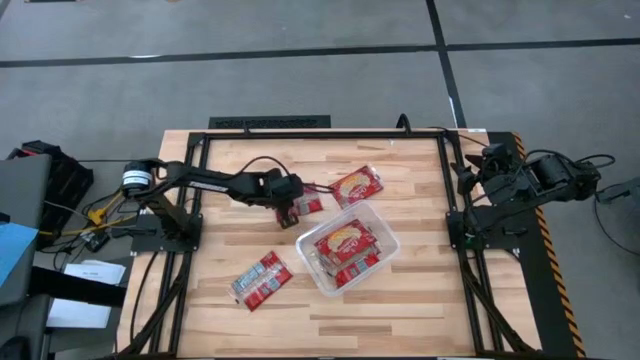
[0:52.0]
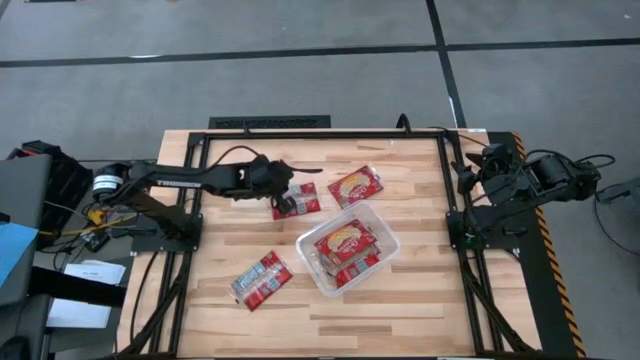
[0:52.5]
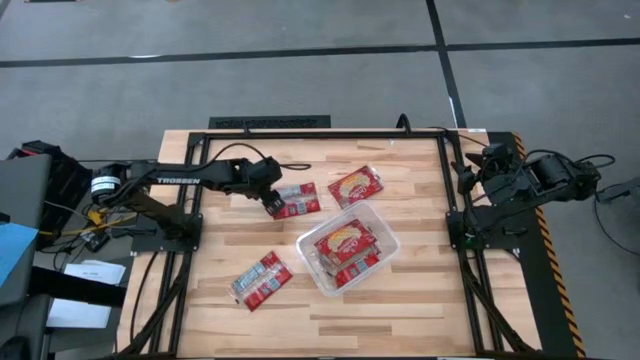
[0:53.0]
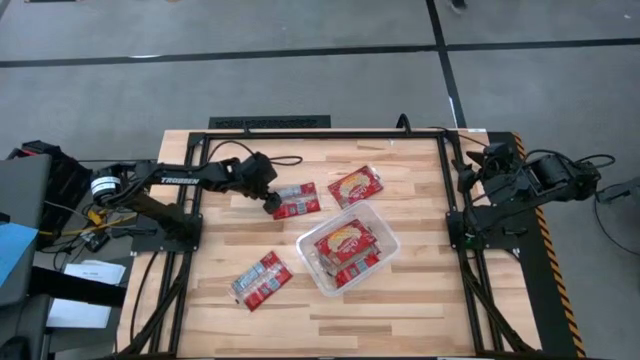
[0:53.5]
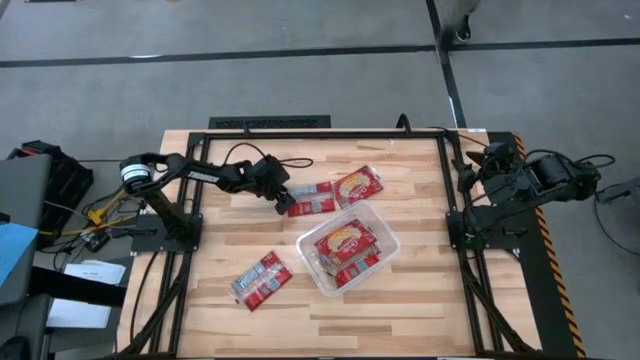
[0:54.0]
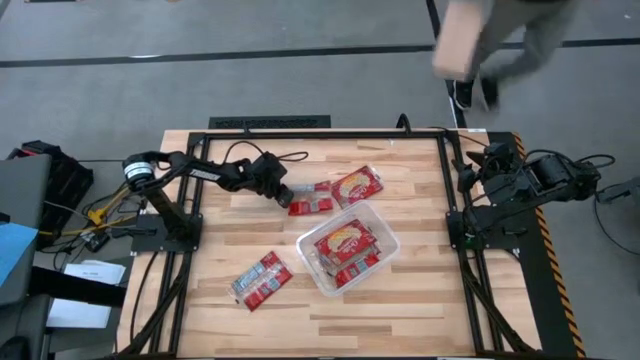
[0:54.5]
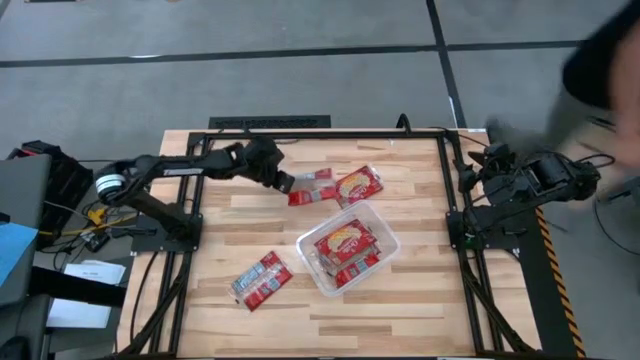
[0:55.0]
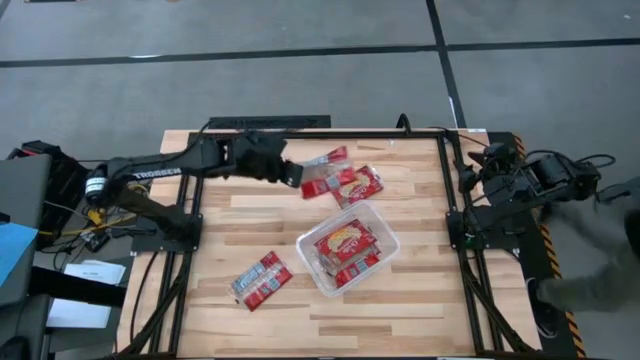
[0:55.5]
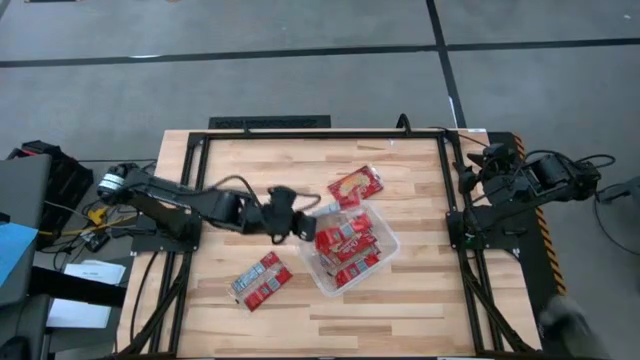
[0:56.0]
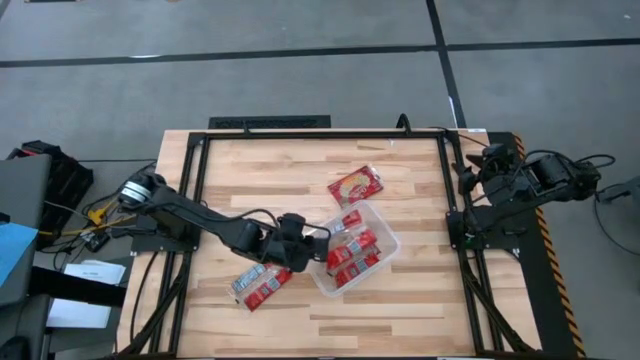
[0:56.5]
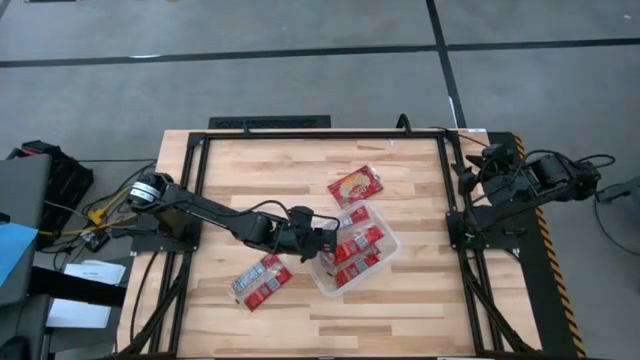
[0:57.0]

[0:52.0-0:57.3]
Task: Sort popcorn bags into baskets
Put the red popcorn pack into the transparent container

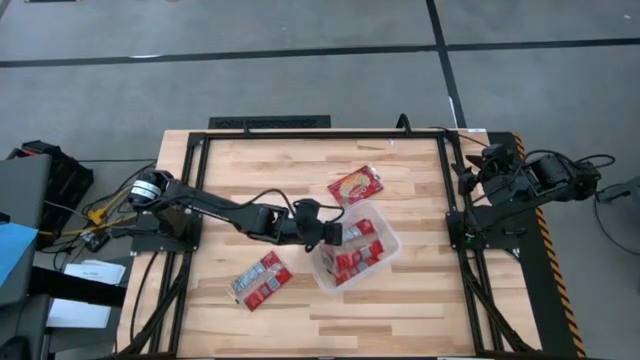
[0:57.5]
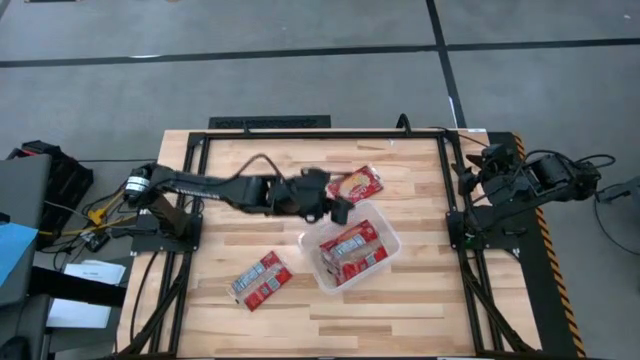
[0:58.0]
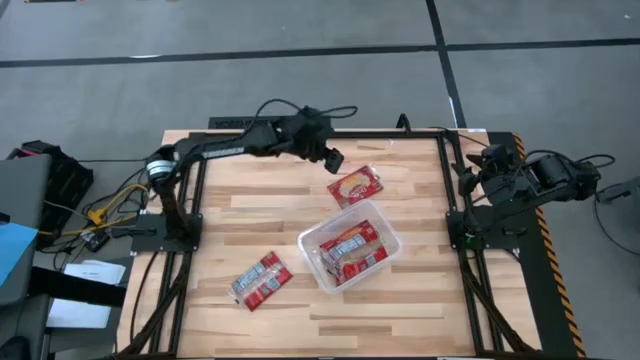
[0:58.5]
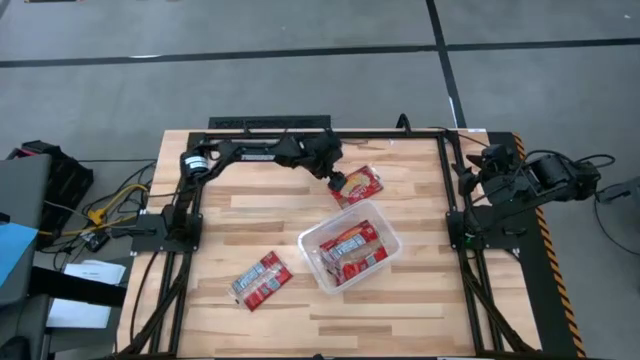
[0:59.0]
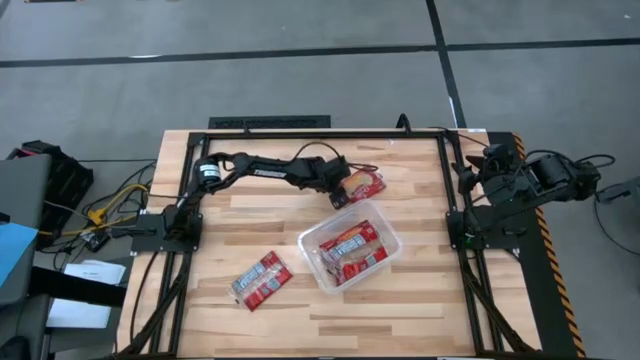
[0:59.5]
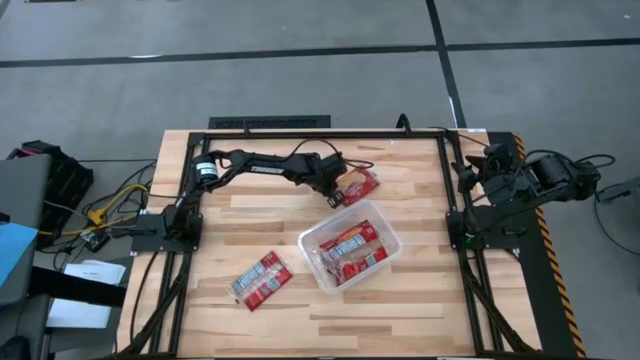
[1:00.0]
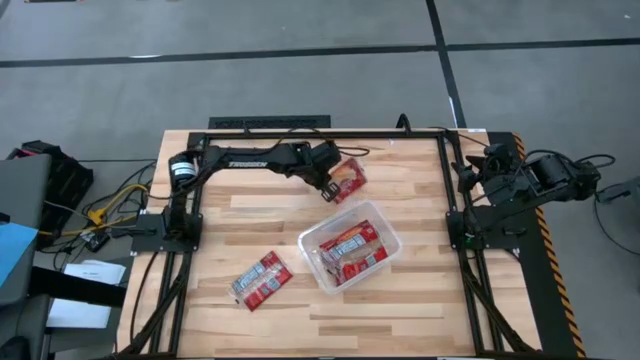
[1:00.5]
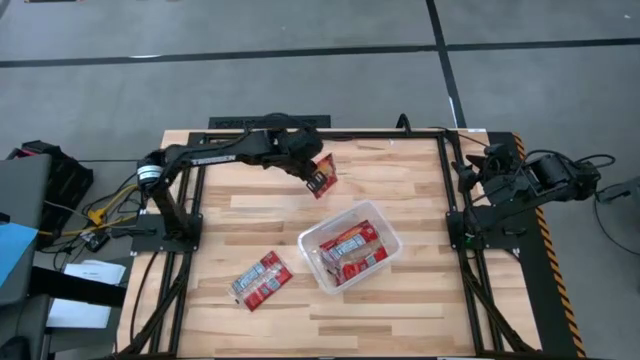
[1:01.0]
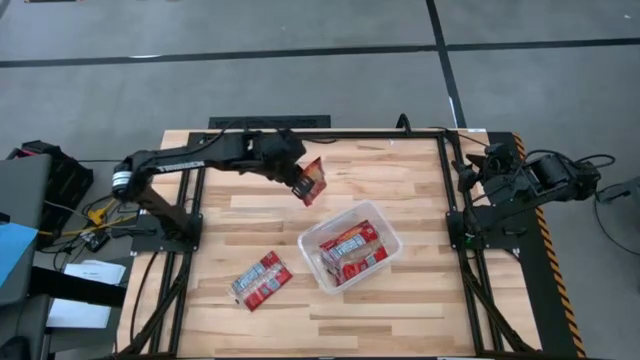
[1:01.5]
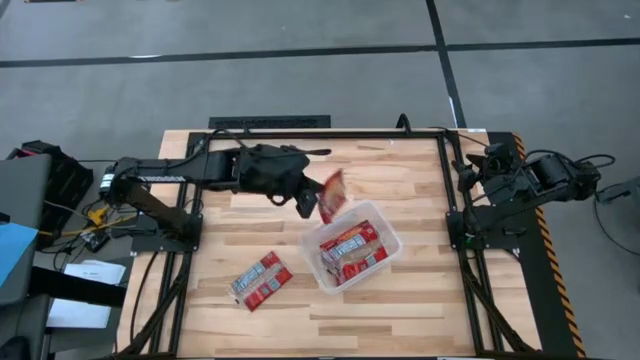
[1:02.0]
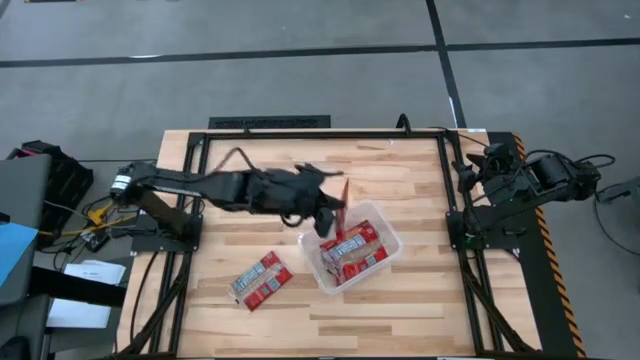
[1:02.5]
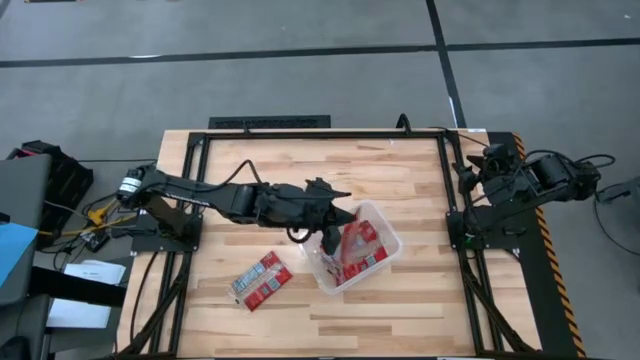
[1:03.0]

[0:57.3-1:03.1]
Put the red popcorn pack into the transparent container

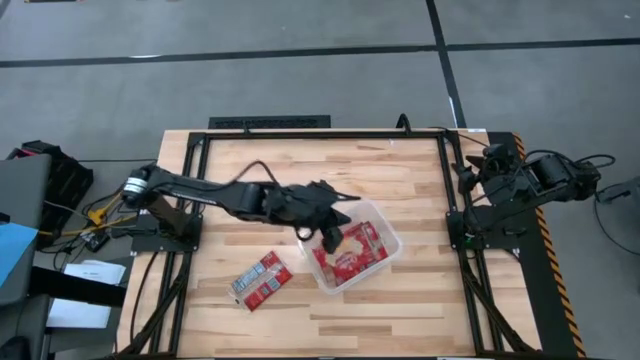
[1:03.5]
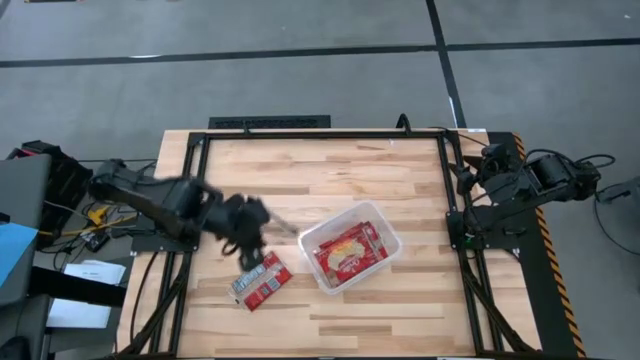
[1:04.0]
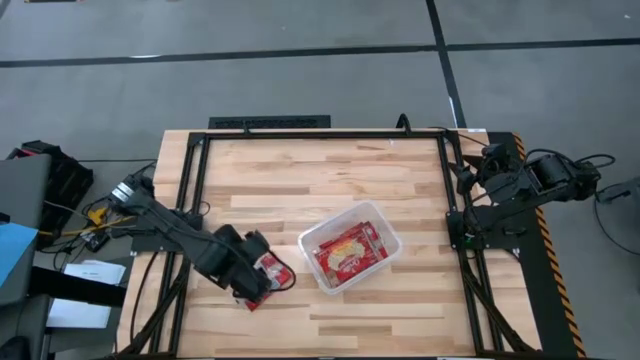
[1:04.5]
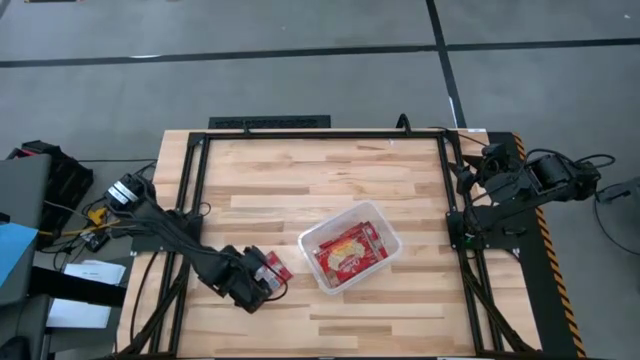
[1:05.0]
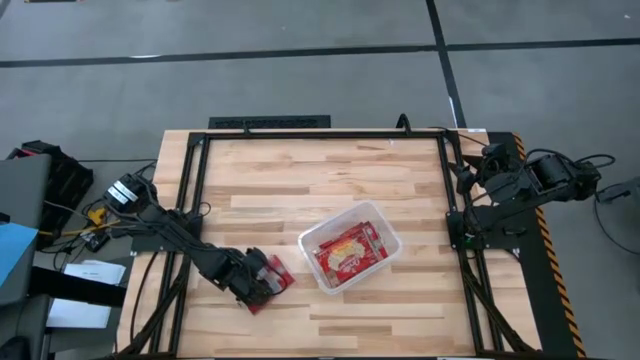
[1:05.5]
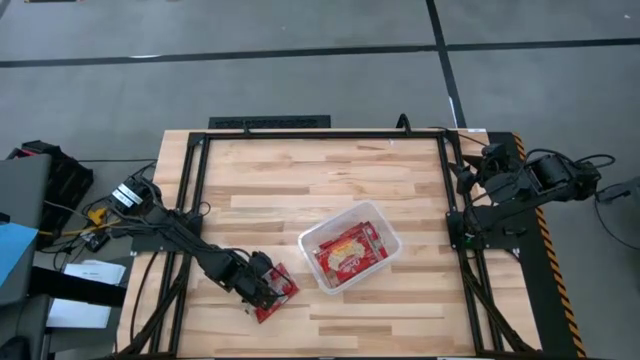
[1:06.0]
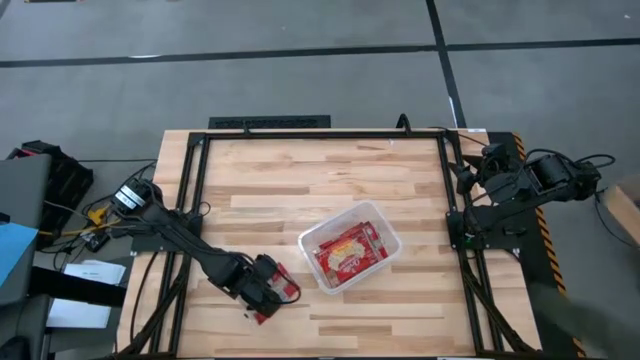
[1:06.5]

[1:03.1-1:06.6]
Put the red popcorn pack into the transparent container

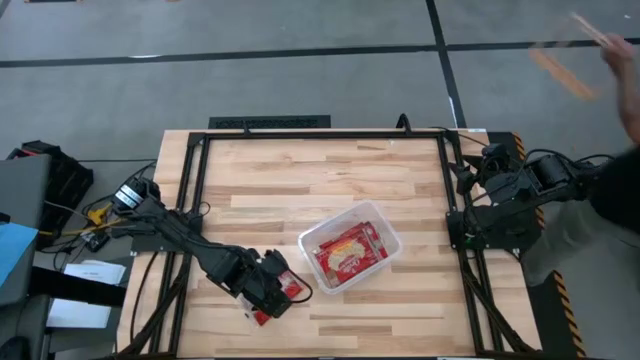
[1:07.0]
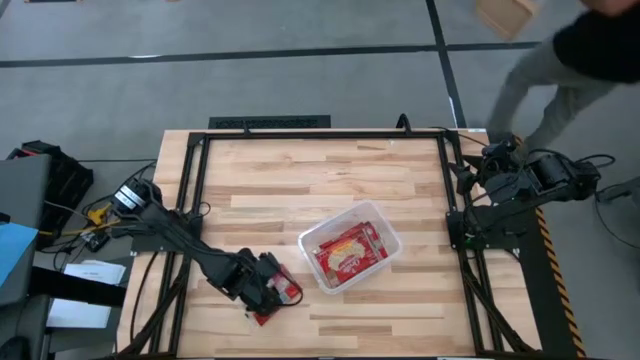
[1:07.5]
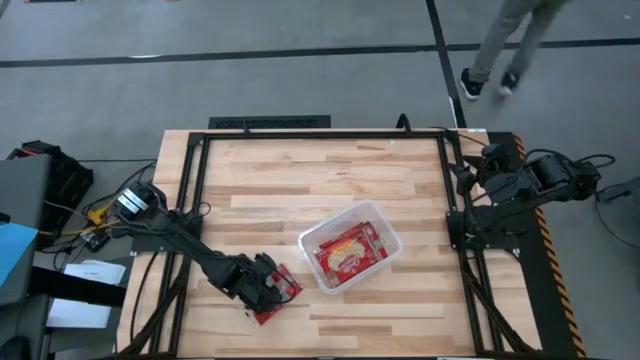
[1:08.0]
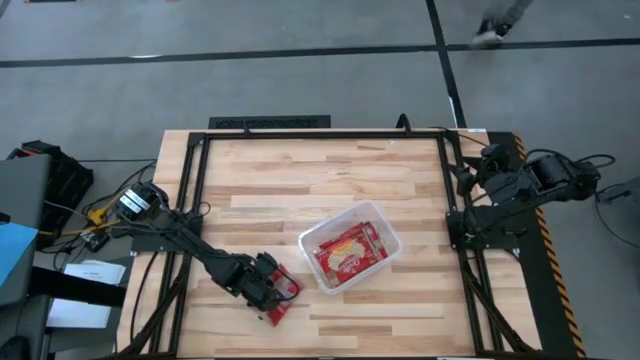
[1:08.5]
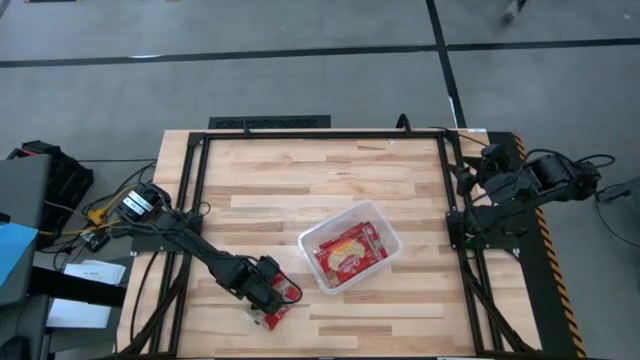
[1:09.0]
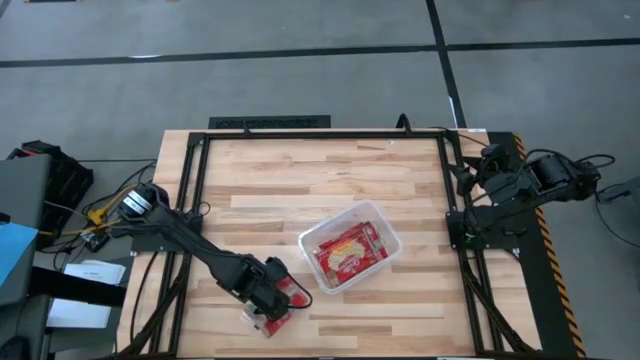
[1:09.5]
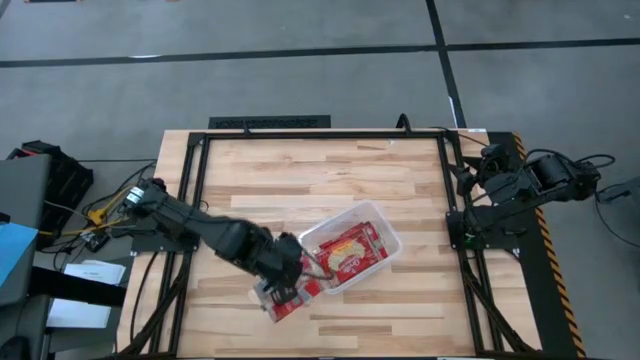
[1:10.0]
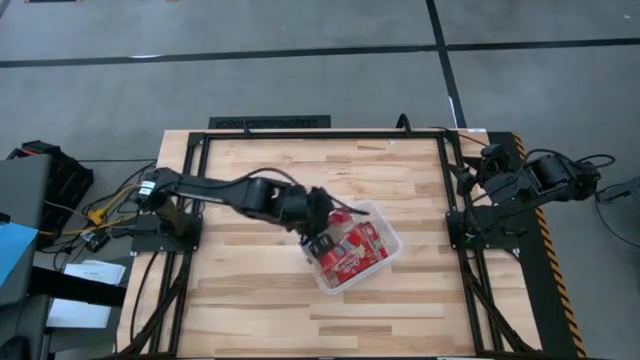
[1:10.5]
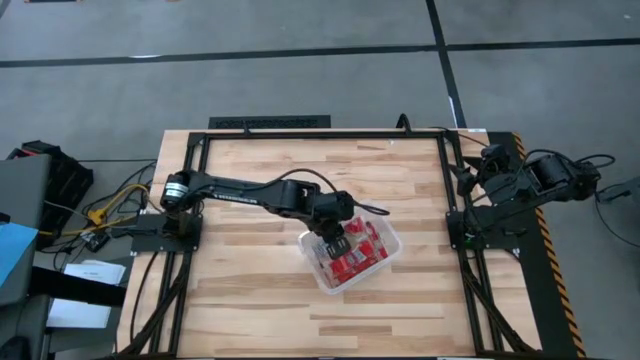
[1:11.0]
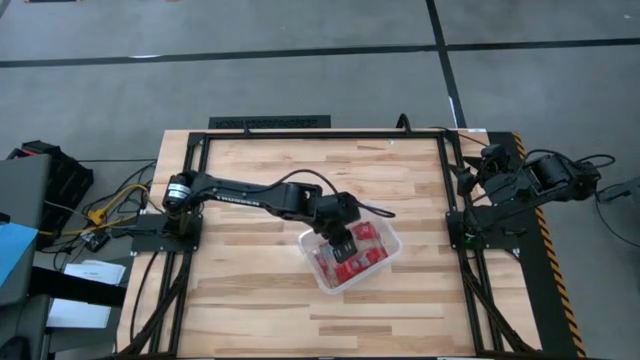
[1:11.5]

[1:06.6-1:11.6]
Put the red popcorn pack into the transparent container

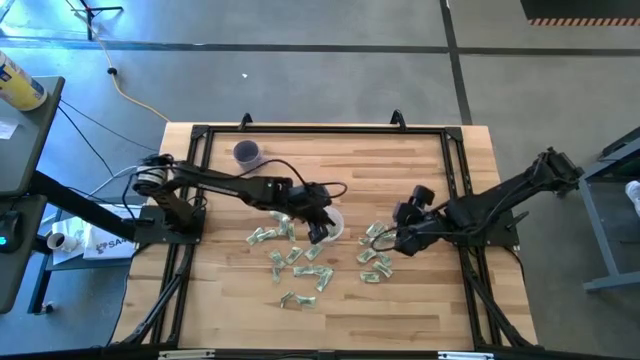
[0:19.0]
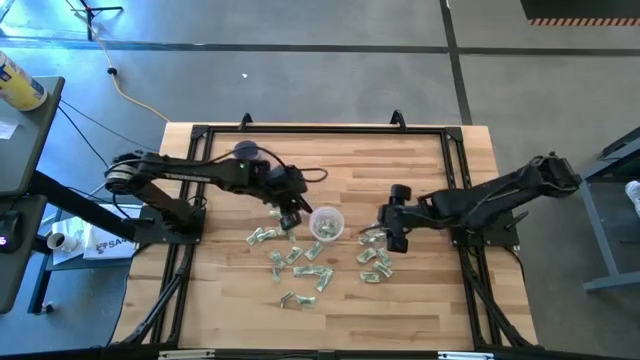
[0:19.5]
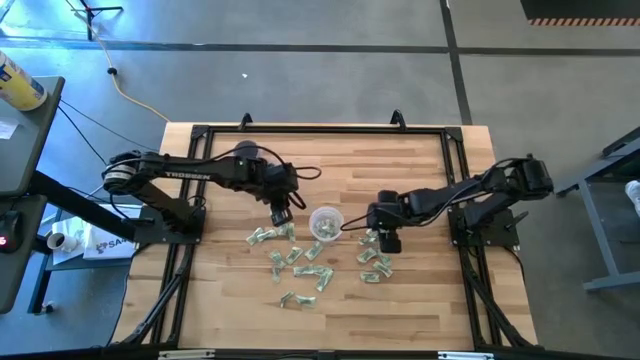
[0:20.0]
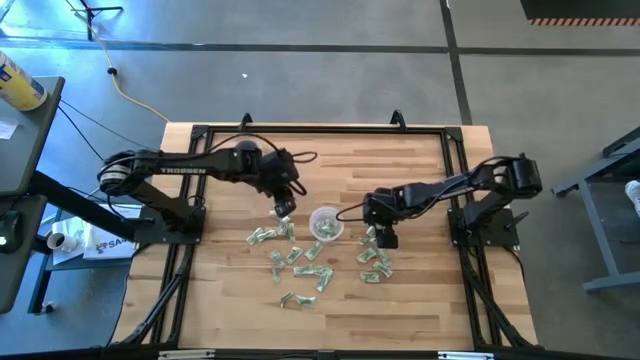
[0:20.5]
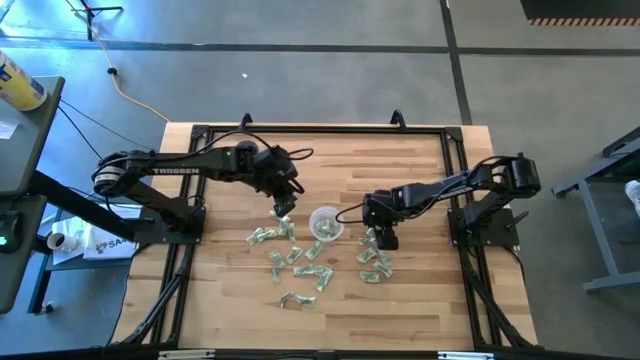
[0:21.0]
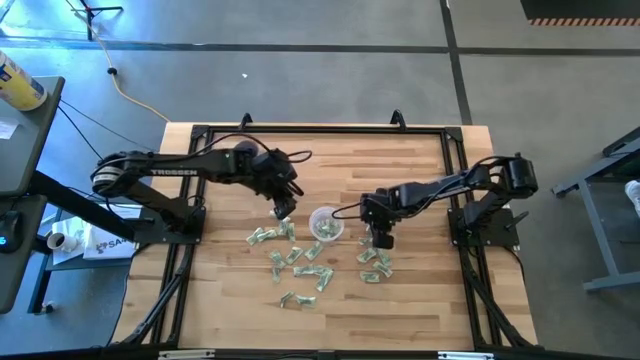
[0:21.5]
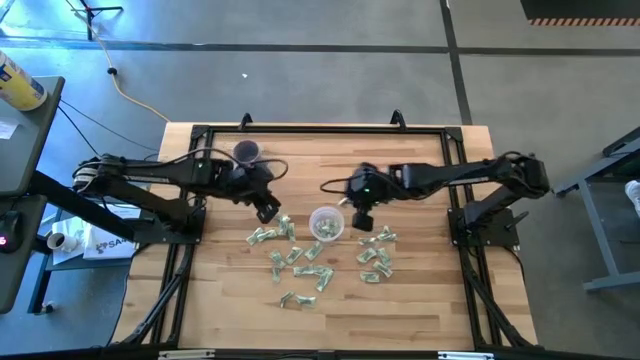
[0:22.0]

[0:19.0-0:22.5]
Task: Pick and place Stevia / Truvia into bins
Put the stevia packet into the transparent container
